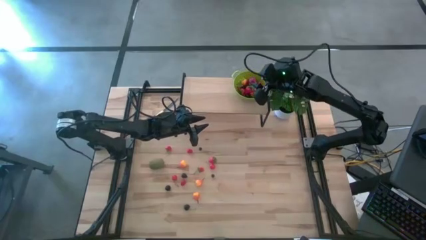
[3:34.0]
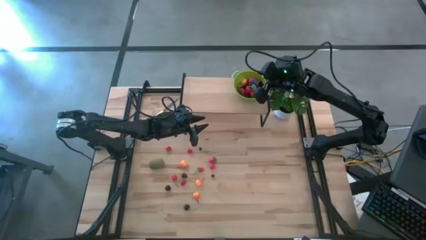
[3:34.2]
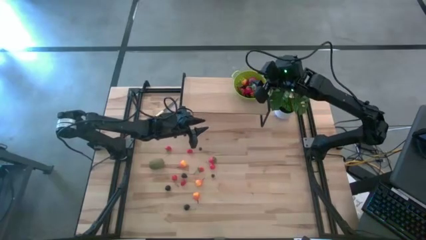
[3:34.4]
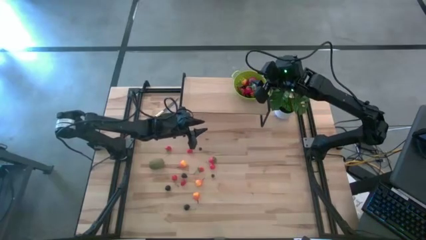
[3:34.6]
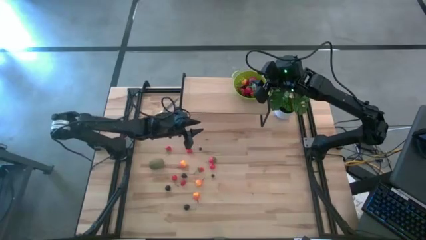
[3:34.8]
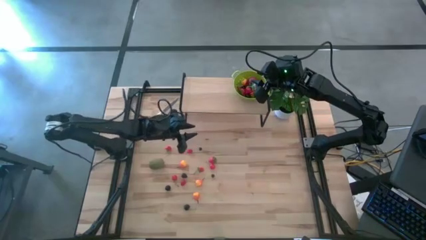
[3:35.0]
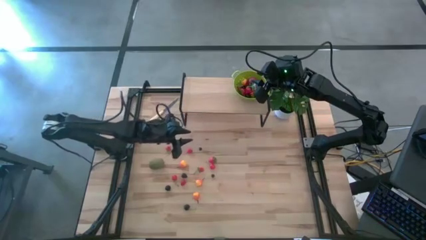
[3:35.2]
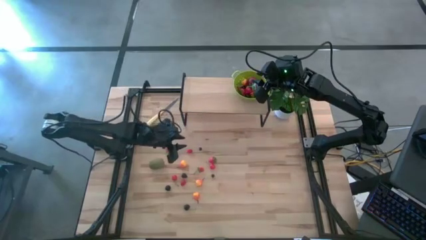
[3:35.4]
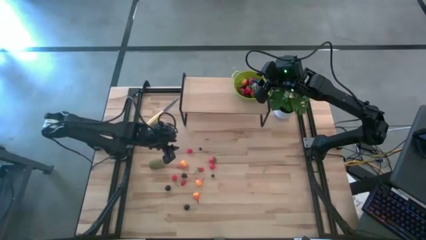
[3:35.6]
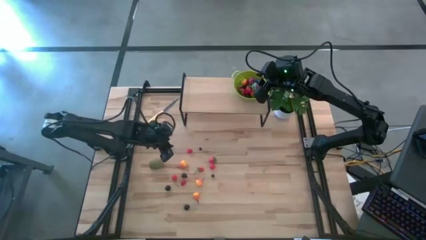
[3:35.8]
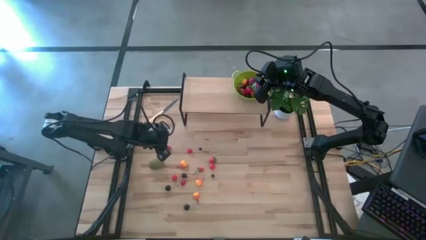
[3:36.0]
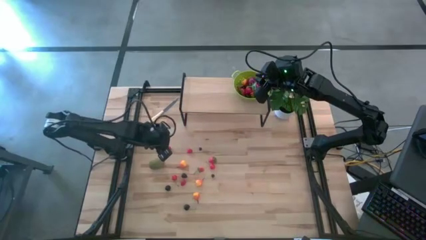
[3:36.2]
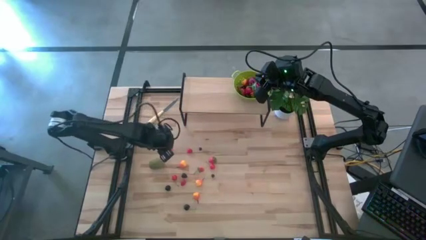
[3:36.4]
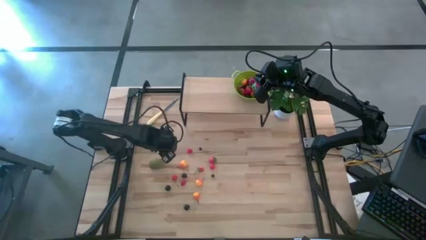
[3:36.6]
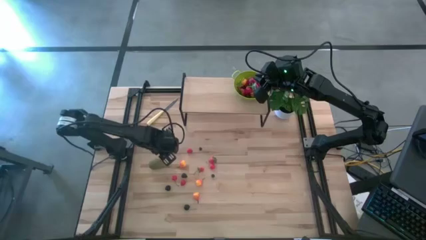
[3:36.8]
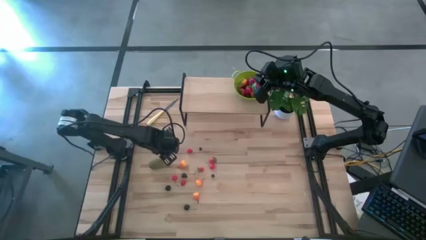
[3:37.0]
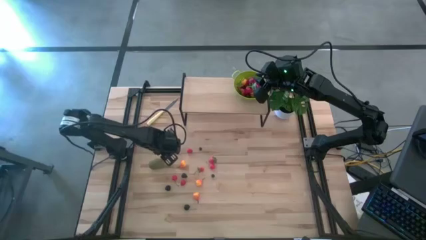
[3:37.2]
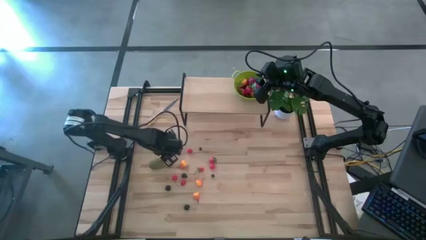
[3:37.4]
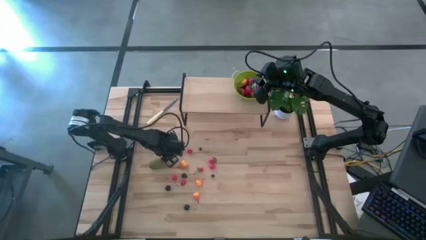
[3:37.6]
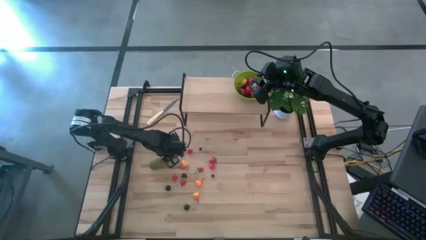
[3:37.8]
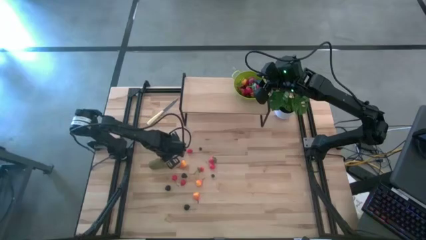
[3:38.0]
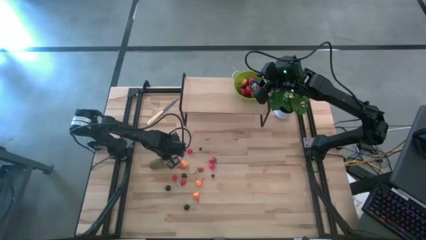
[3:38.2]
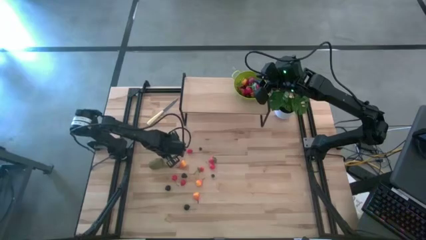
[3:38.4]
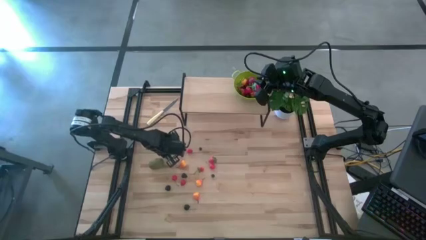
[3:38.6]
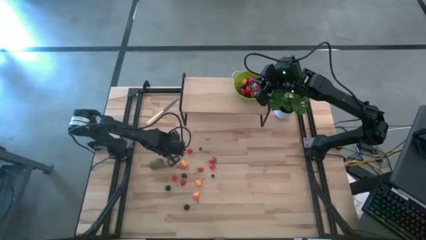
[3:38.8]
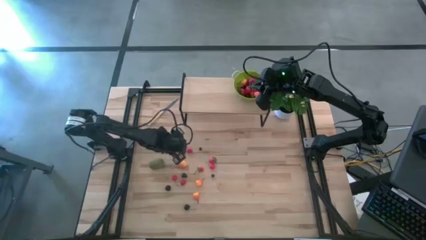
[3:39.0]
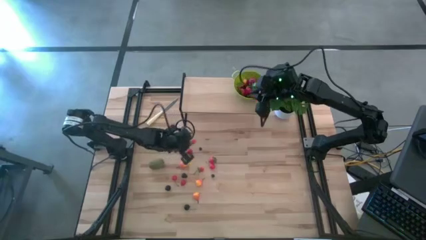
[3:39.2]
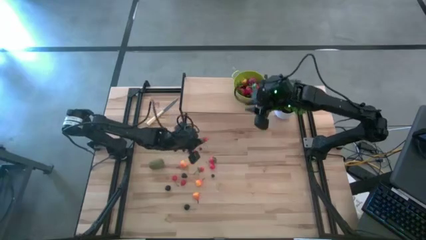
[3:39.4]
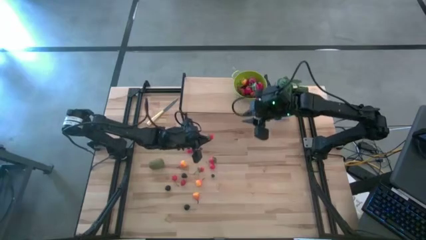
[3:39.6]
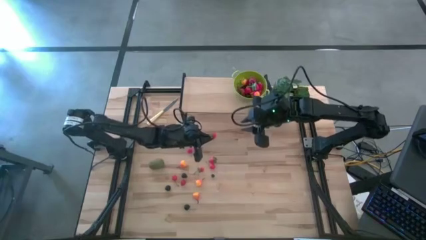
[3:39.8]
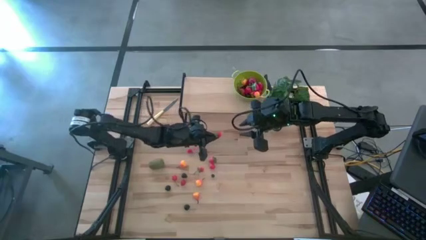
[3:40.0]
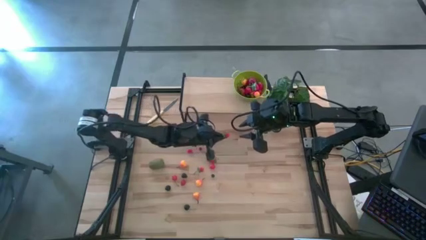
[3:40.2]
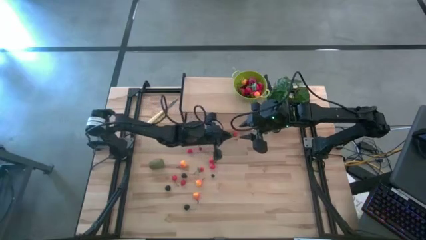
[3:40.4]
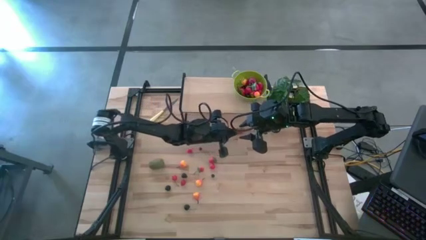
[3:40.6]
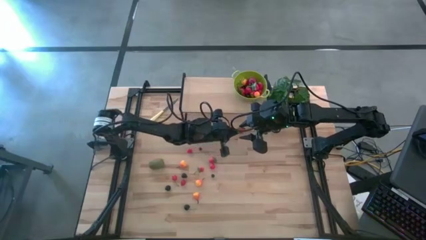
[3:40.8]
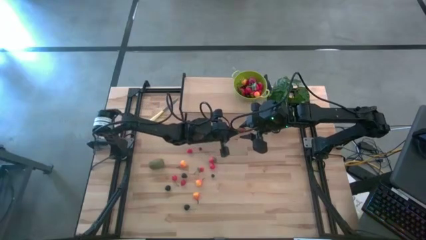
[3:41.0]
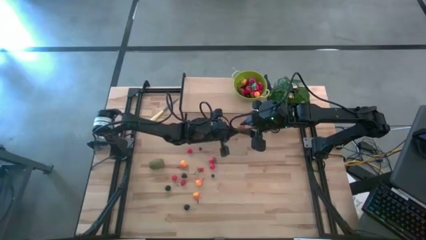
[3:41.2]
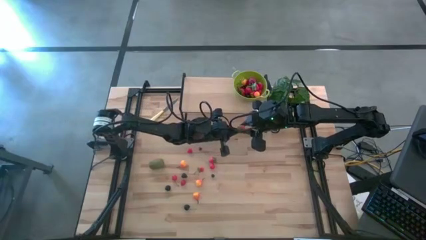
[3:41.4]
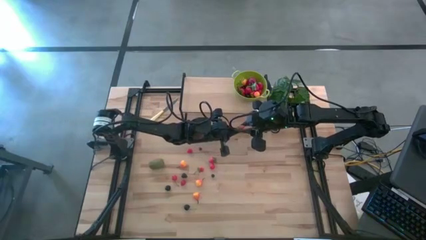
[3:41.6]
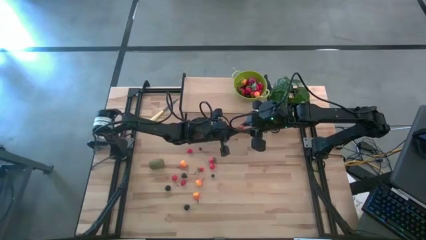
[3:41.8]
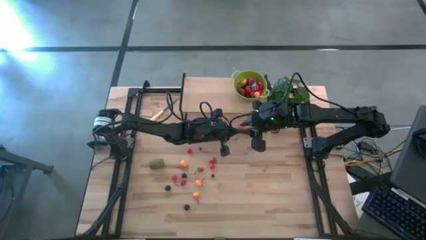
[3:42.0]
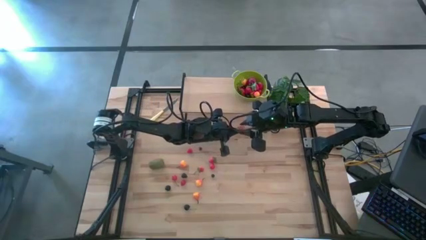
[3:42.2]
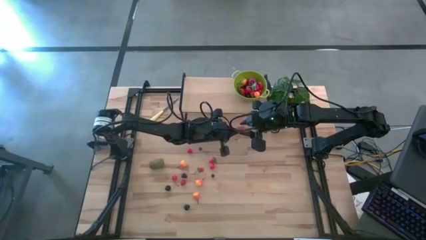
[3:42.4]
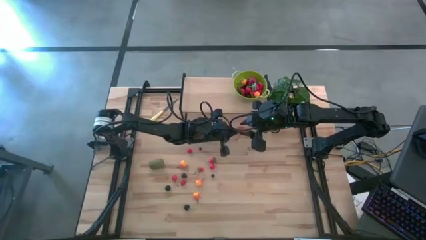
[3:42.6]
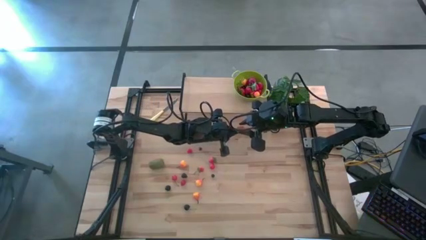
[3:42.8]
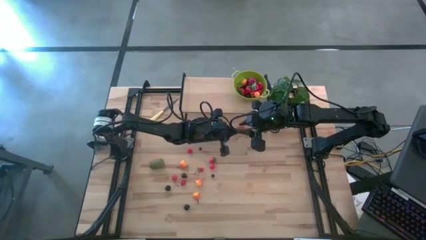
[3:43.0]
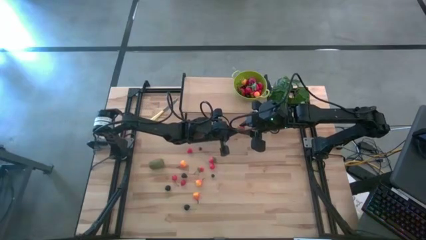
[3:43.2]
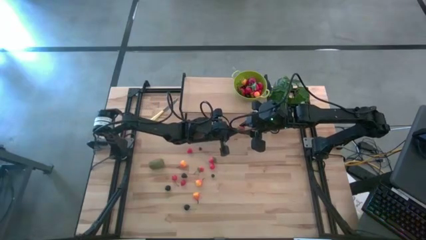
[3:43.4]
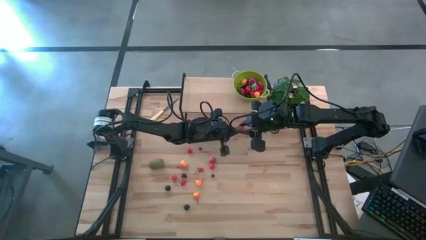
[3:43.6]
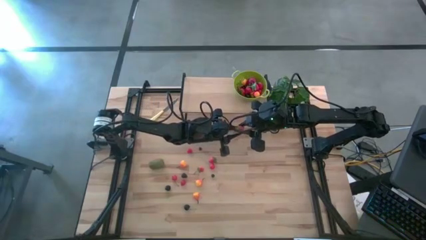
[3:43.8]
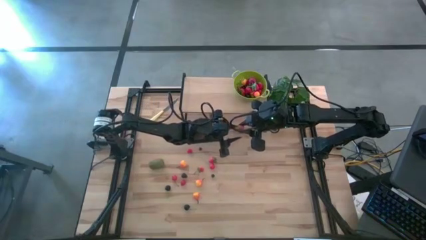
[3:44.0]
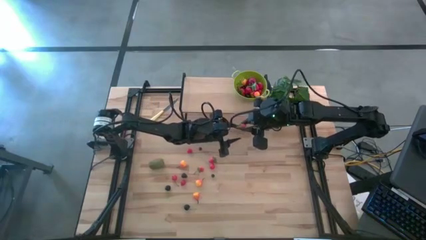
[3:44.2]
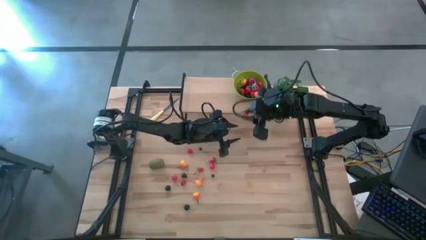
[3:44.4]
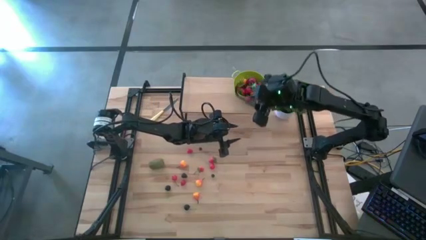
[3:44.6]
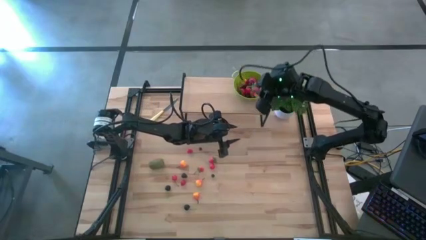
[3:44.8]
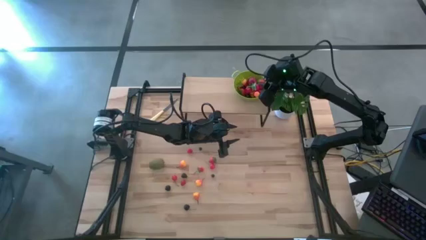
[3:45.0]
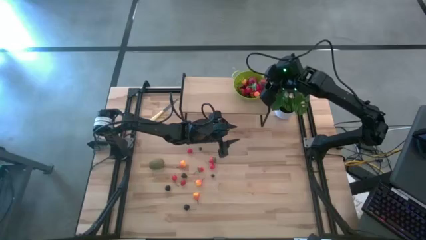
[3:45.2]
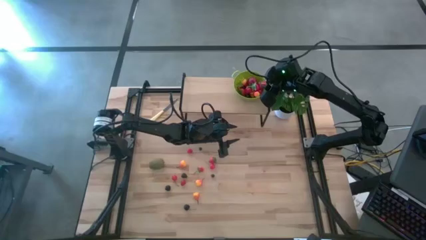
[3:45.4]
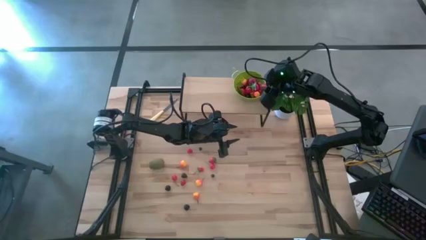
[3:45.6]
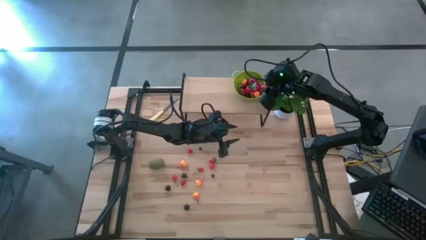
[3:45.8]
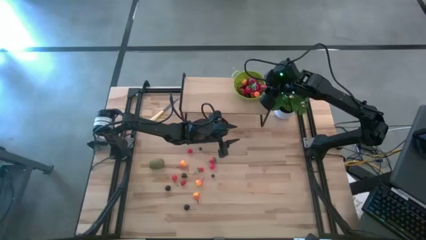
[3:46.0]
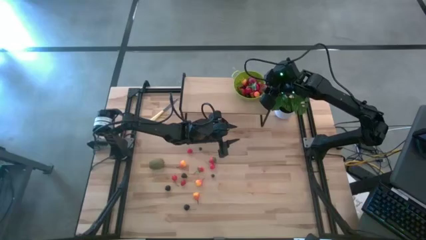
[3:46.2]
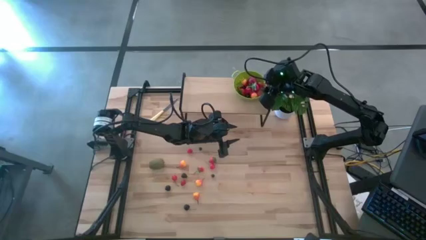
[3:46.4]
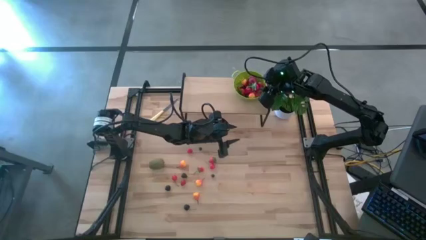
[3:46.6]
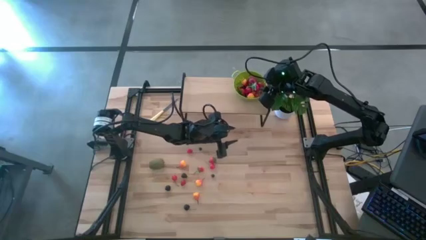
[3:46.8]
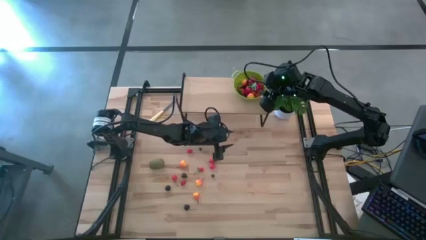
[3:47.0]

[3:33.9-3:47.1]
Task: Build produce basket
Put the strawberry into the green basket

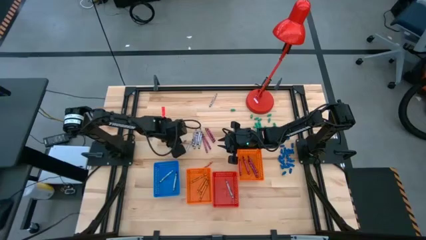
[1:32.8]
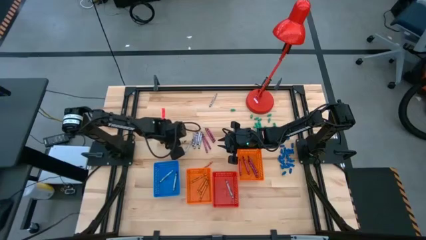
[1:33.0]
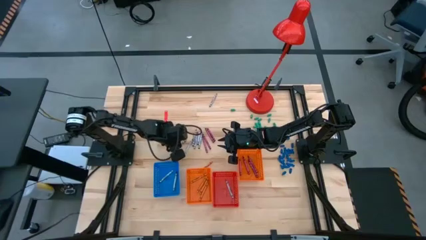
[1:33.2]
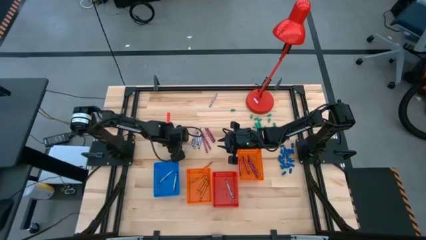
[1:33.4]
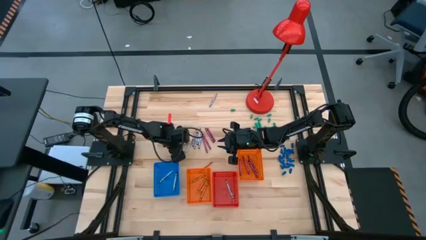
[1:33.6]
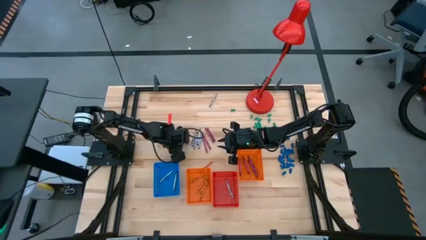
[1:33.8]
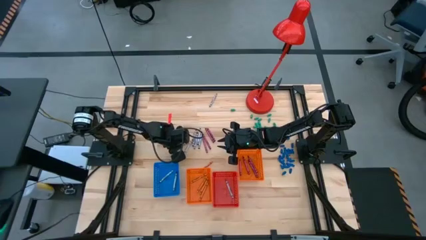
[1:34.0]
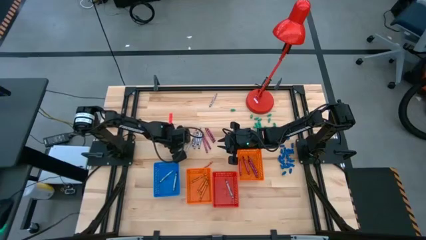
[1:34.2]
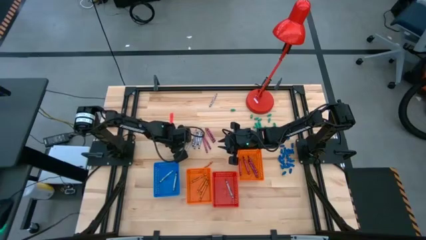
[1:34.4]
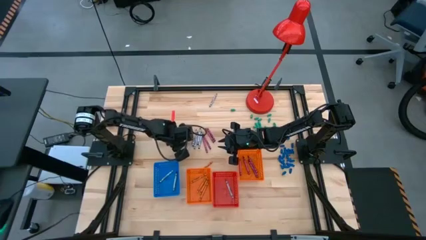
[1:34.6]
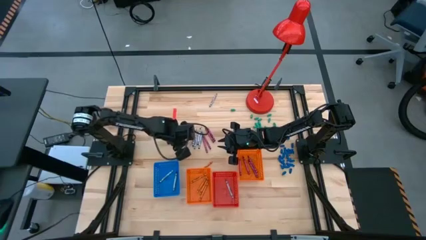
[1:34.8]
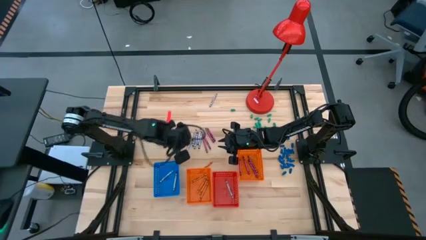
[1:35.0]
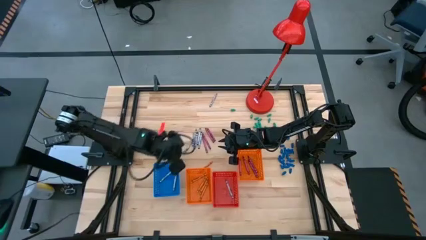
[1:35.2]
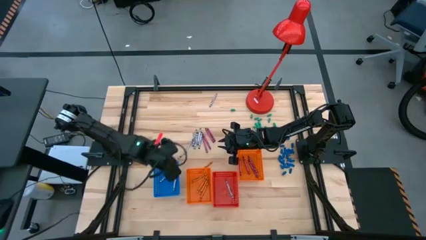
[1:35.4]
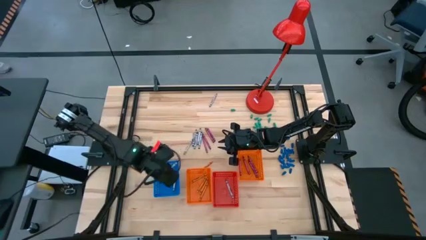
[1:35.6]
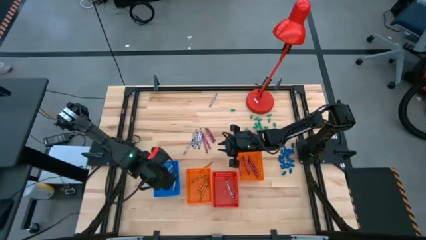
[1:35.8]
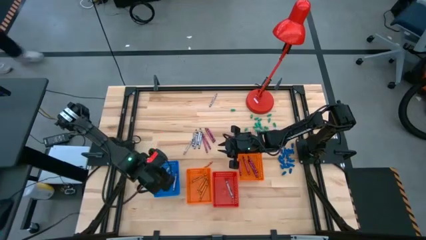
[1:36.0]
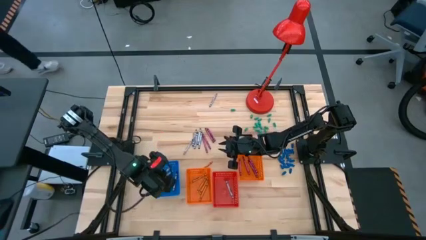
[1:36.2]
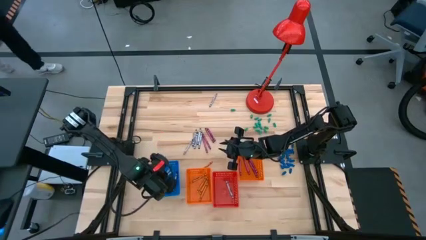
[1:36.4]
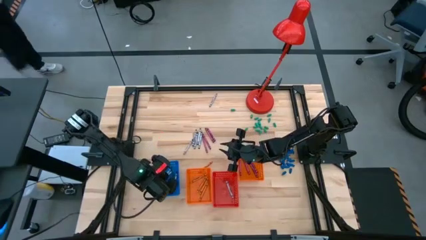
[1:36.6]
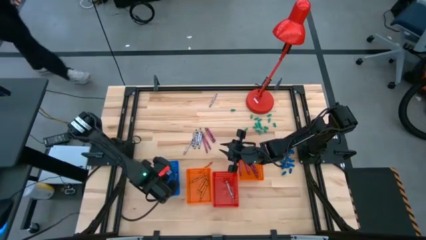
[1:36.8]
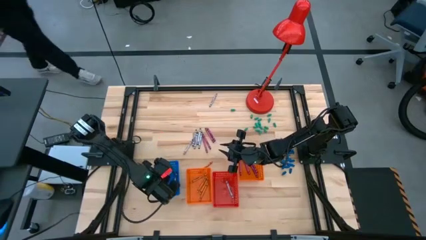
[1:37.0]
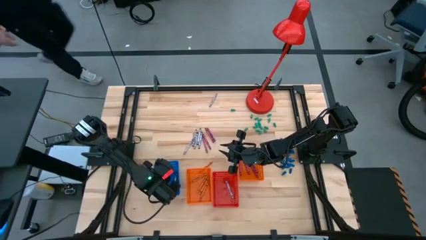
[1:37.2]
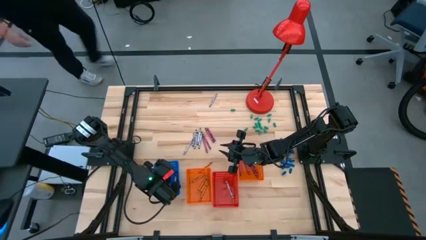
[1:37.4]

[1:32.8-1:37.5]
Task: Sort crayons
Put the black crayon into the blue bin
